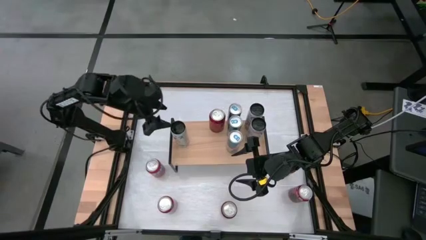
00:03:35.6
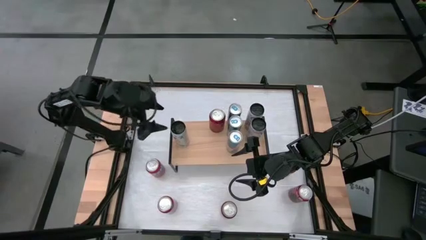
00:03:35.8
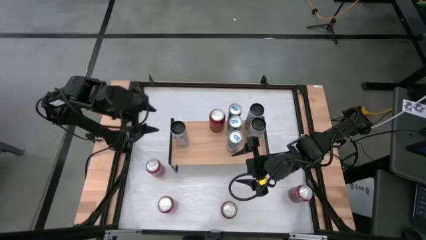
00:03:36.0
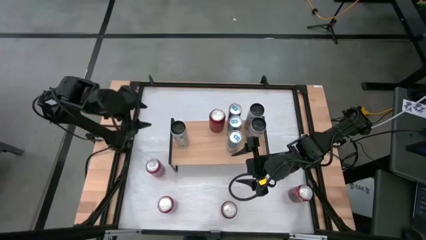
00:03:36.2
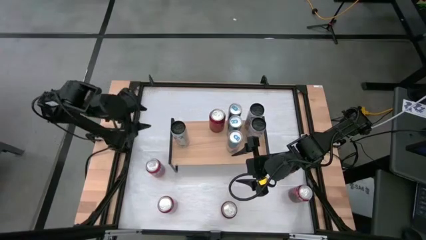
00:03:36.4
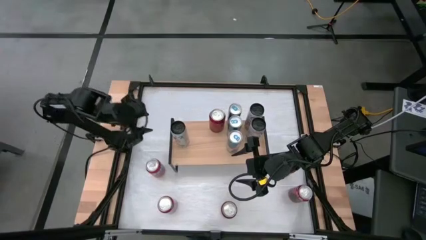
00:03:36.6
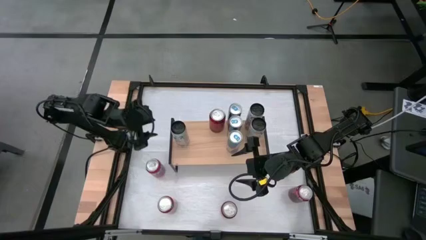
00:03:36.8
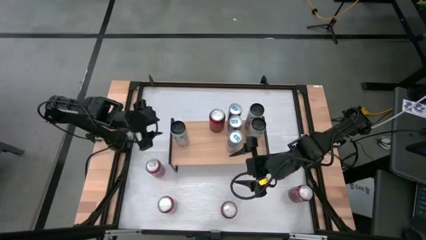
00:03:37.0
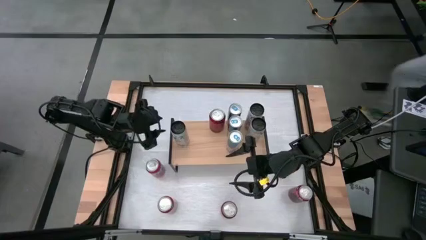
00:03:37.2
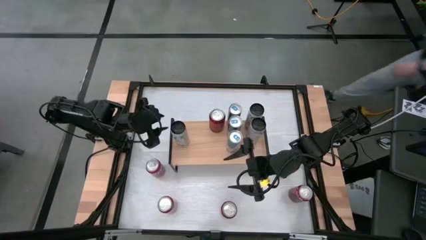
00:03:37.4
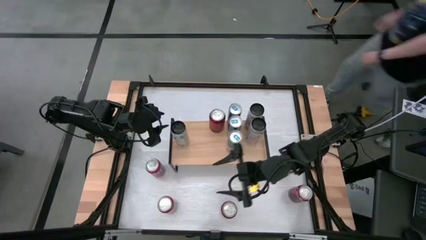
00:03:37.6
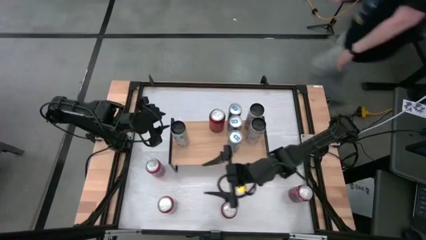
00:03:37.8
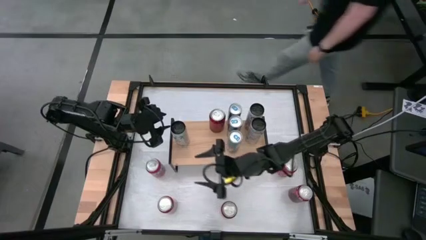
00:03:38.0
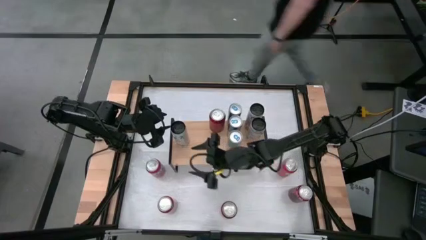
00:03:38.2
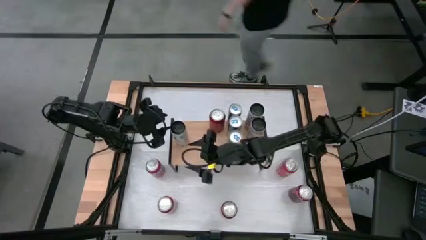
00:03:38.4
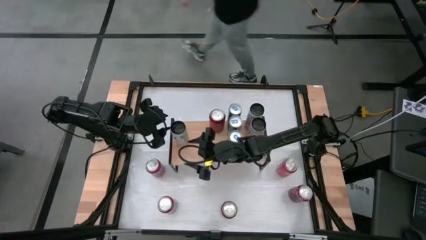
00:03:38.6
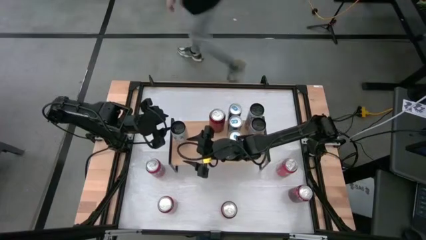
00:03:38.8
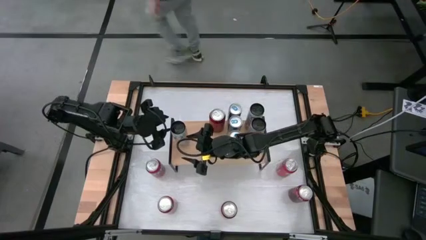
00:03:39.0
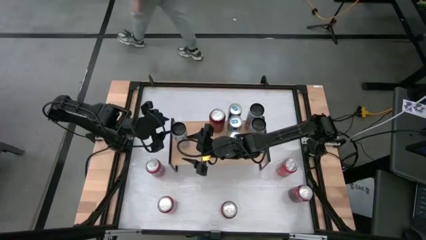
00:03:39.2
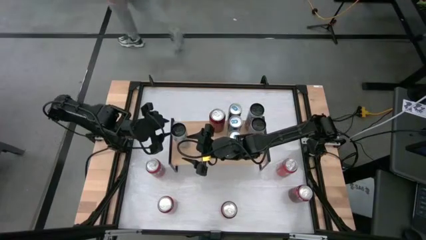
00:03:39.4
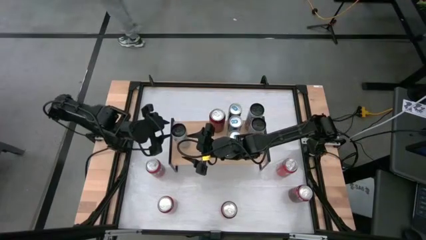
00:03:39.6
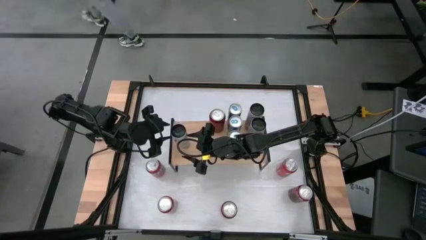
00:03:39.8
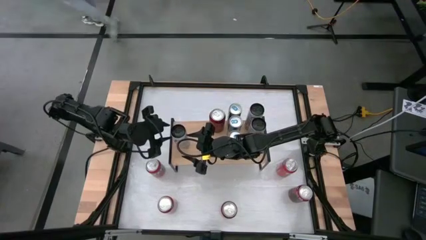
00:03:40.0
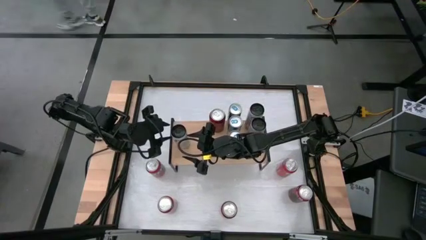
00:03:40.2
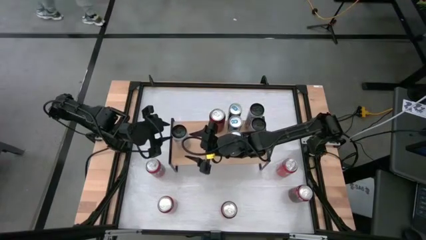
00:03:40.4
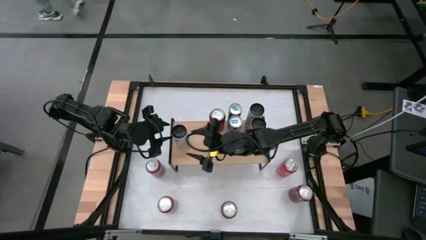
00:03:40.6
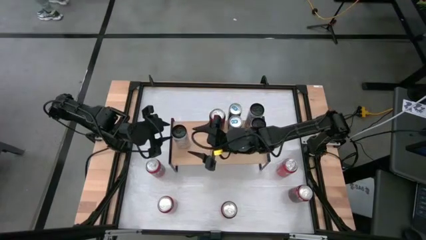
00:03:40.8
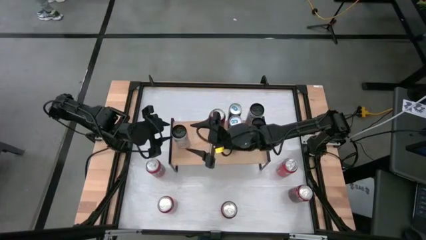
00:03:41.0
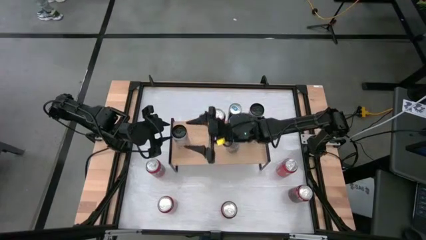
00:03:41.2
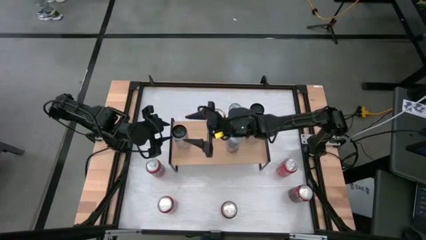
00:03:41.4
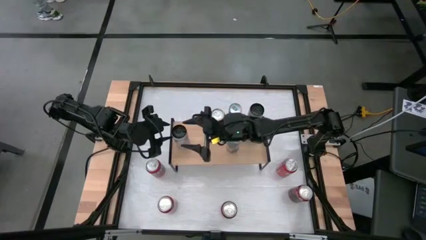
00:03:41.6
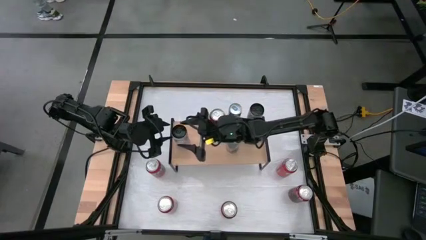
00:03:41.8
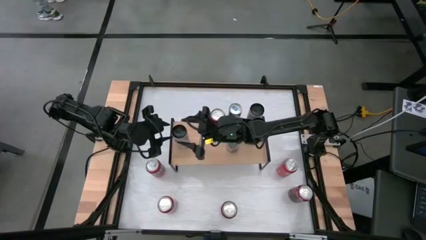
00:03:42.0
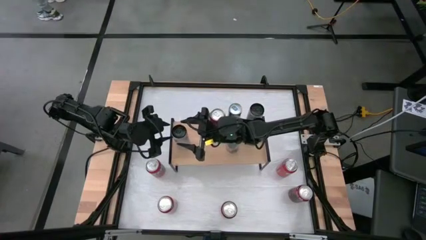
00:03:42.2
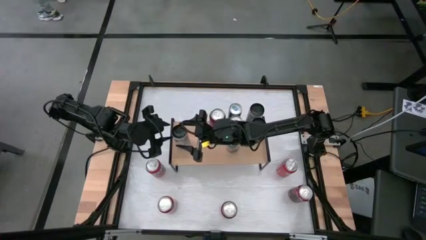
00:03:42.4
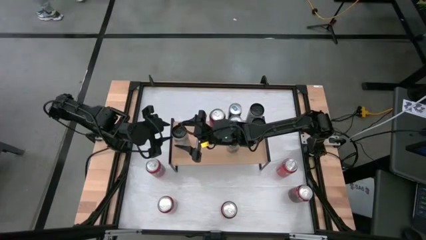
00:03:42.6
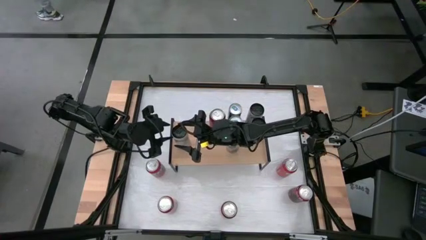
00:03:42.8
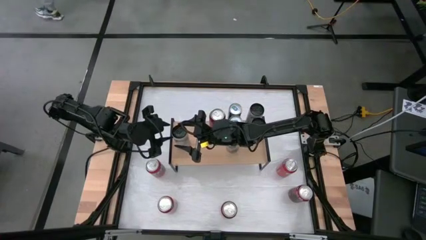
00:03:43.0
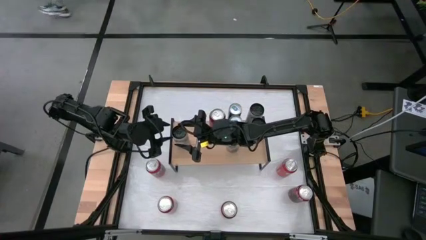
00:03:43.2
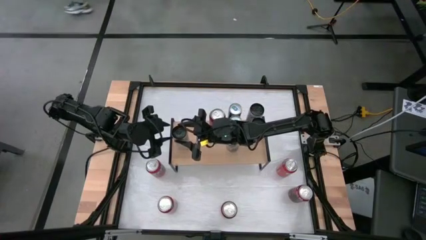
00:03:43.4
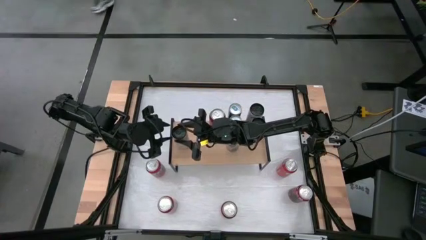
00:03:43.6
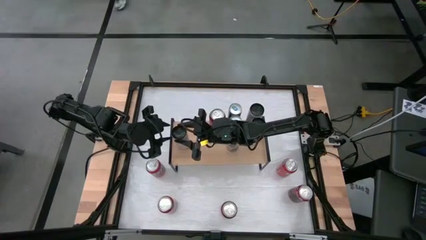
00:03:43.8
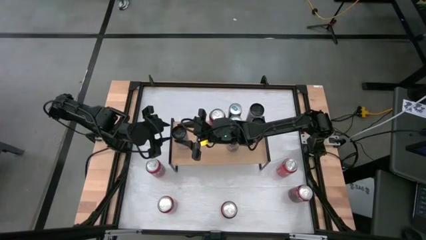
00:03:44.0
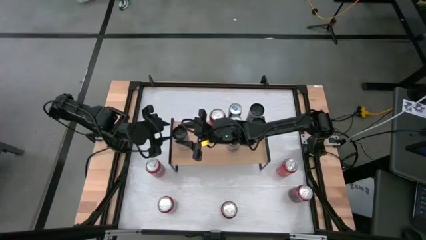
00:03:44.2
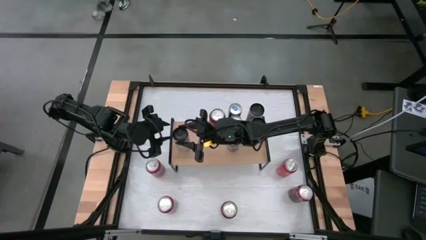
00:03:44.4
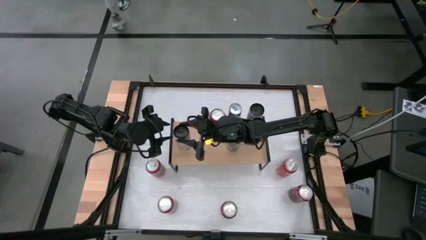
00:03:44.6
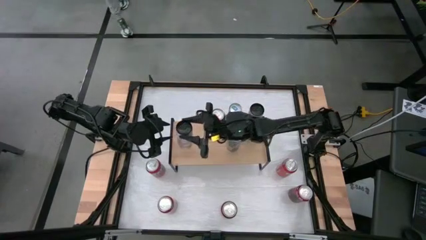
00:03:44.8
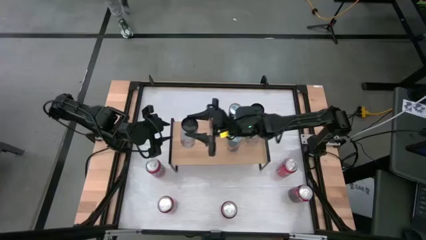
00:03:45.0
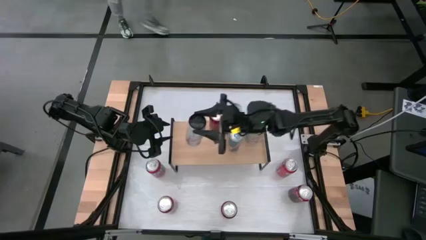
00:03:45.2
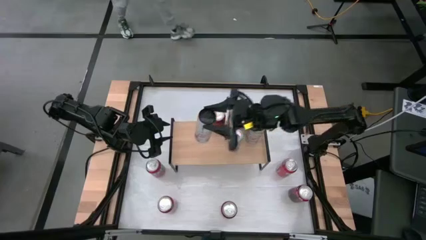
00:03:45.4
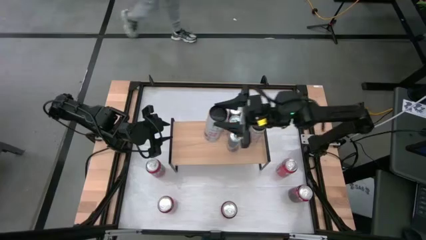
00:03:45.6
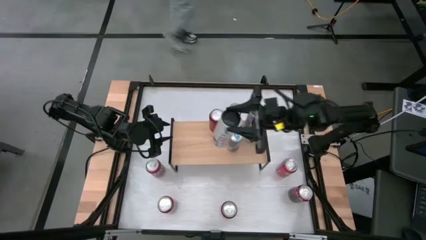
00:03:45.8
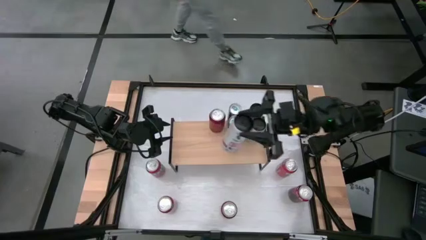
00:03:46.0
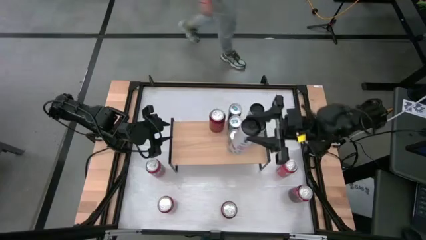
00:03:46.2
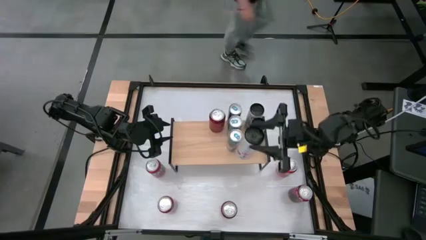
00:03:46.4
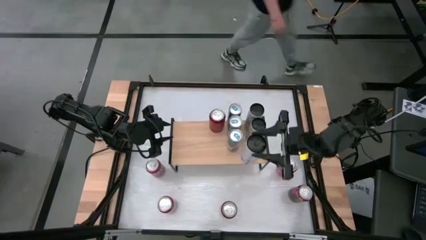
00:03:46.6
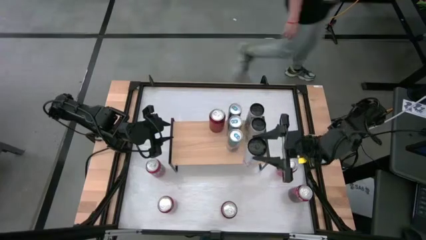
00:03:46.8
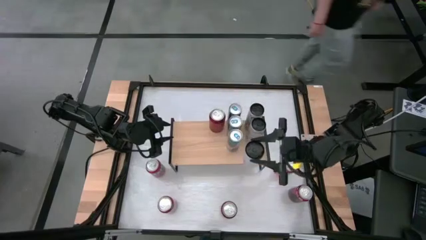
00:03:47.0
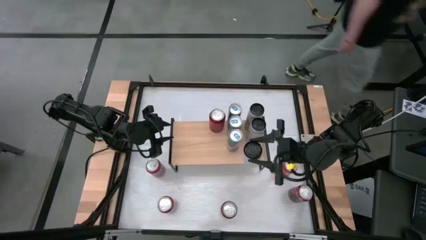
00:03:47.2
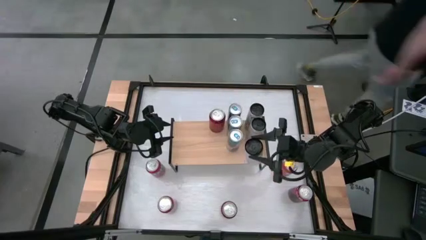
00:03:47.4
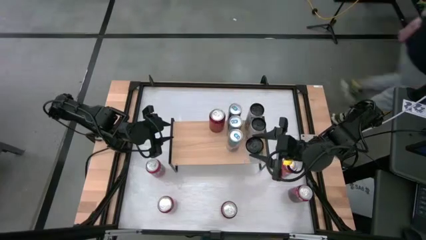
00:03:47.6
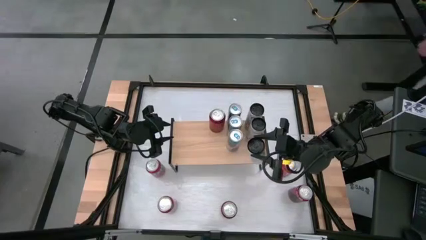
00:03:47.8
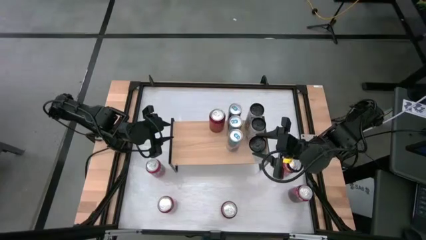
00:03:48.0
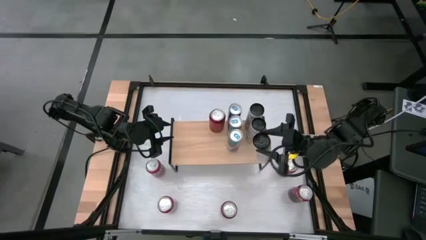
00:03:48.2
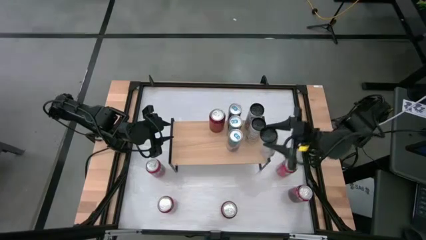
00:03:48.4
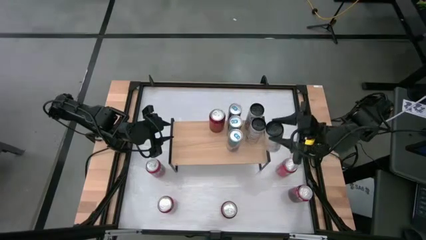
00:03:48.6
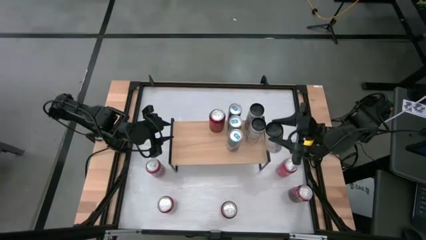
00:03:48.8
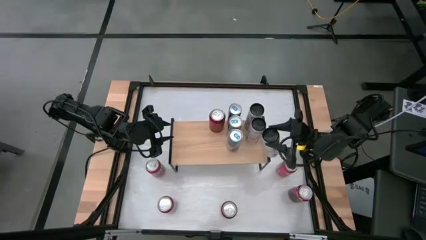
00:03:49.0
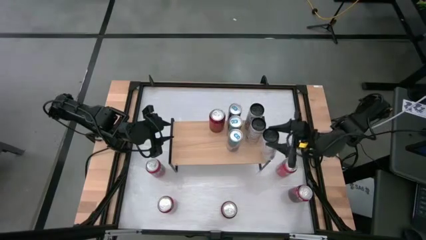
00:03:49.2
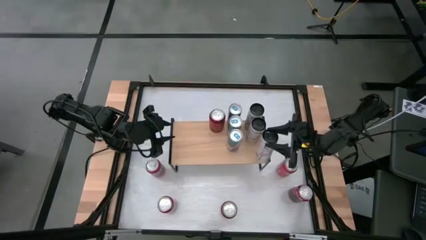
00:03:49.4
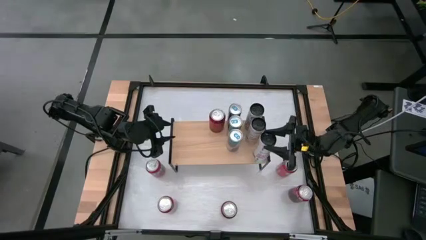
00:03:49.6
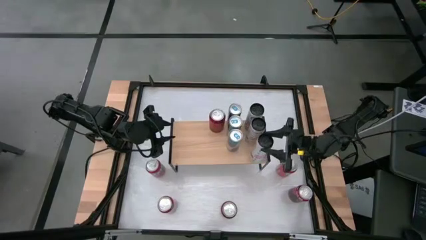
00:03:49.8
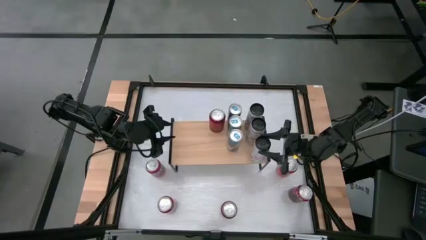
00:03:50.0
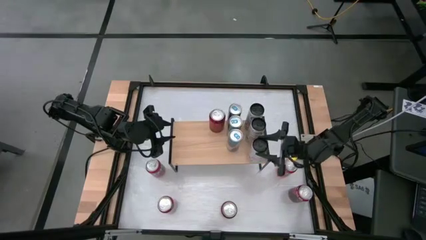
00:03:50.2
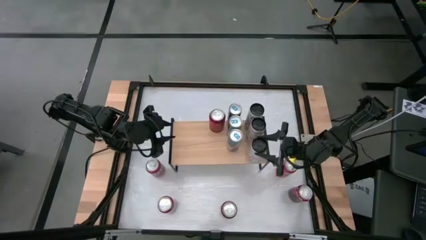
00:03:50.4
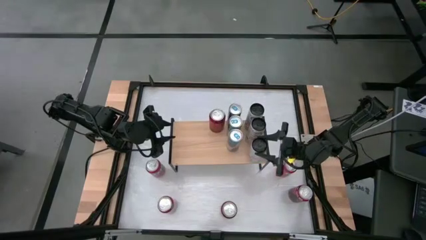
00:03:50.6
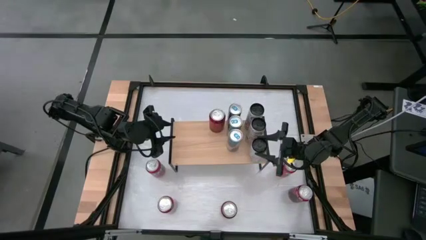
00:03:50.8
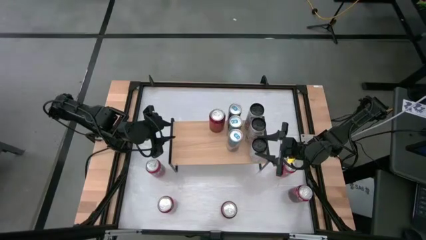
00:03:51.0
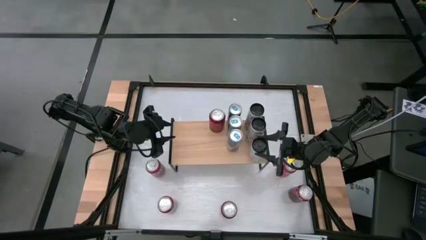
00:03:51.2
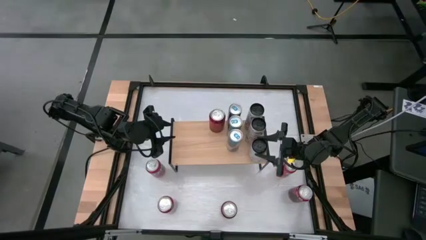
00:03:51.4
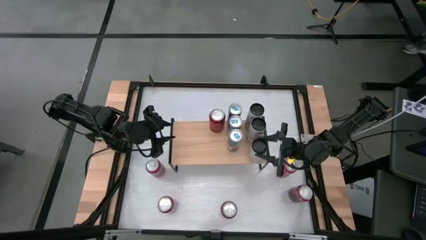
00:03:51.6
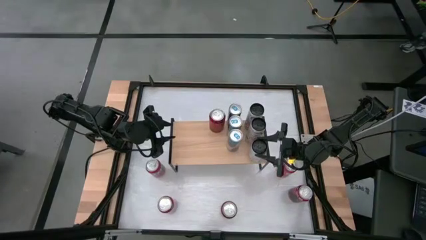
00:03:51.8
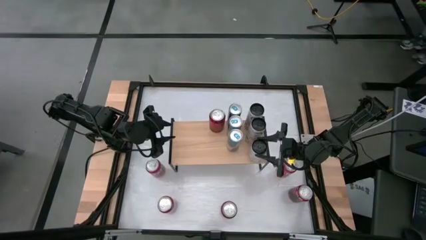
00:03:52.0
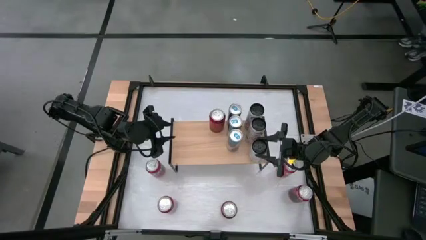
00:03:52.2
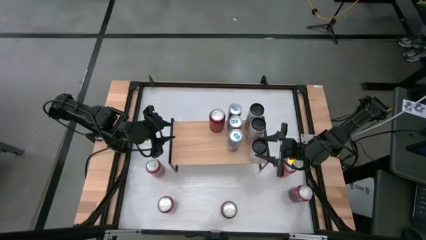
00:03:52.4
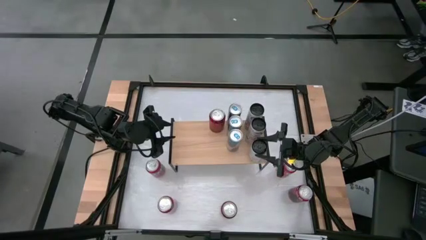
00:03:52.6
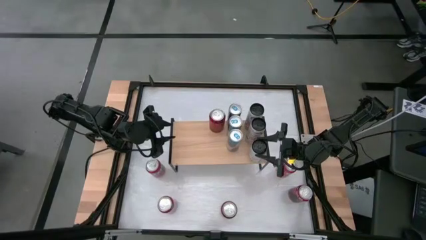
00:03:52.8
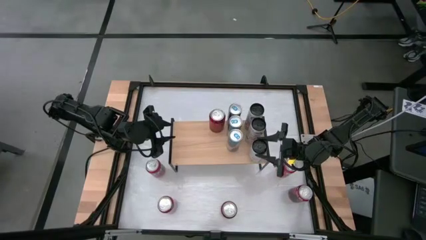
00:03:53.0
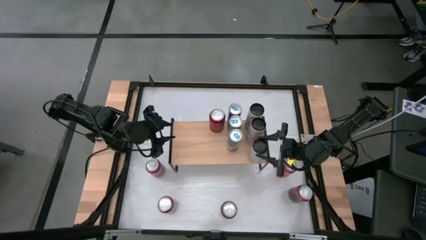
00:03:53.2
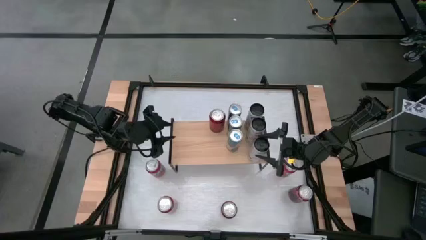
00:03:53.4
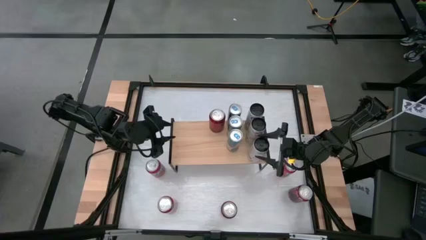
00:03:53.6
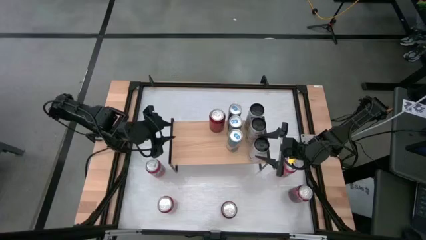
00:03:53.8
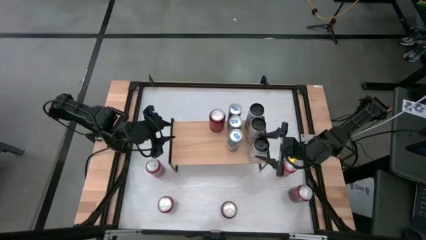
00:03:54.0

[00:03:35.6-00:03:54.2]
Task: Place canned beverage on shelf
Put the white-pink soda can on the shelf aligned with the other white-pink soda cans
